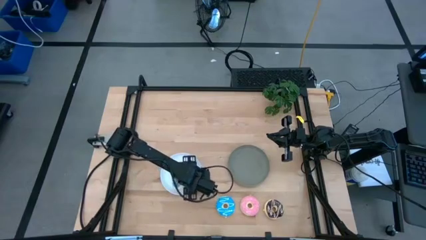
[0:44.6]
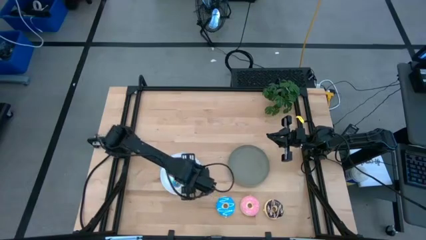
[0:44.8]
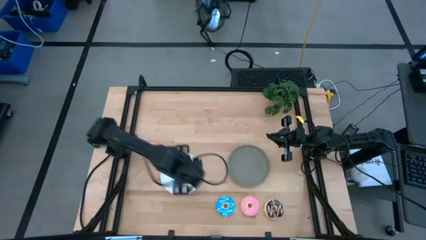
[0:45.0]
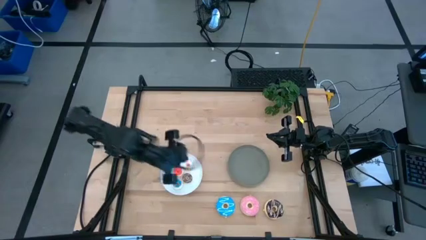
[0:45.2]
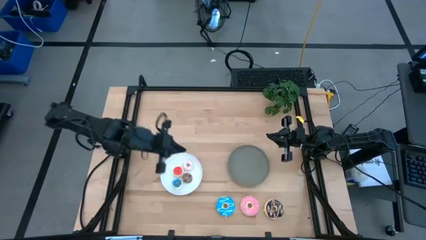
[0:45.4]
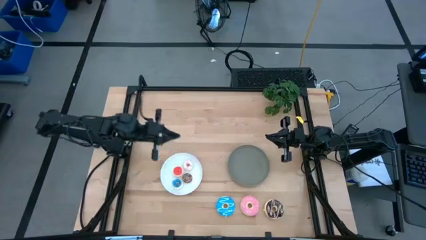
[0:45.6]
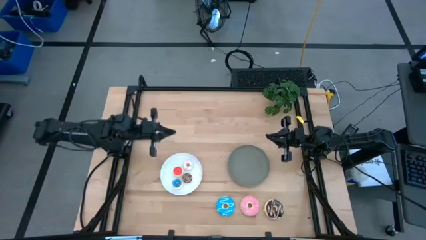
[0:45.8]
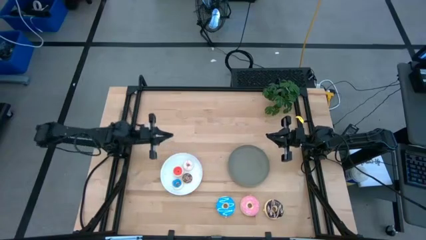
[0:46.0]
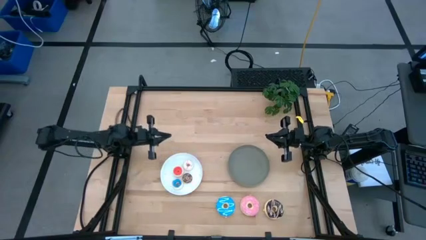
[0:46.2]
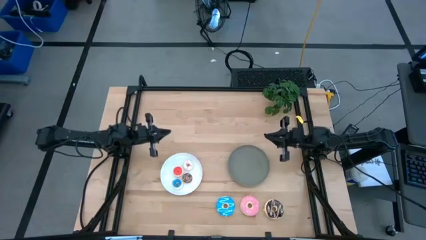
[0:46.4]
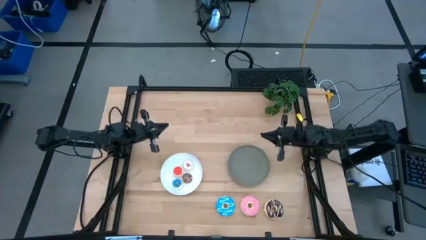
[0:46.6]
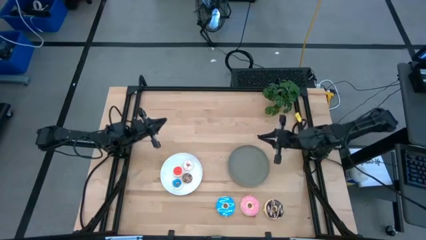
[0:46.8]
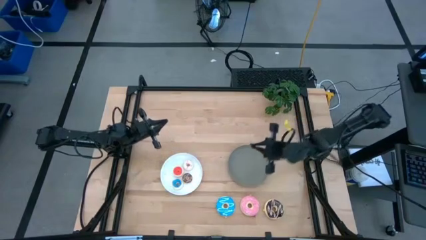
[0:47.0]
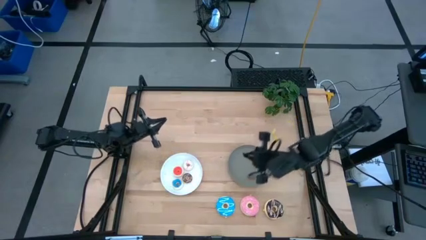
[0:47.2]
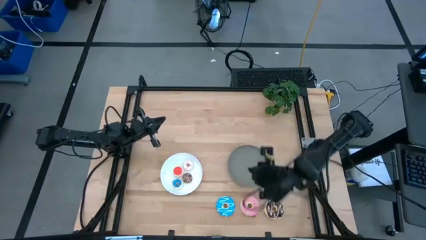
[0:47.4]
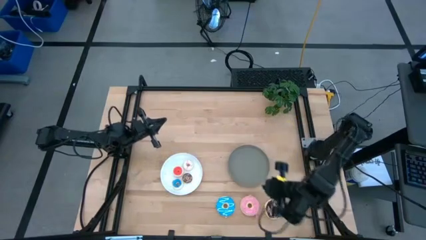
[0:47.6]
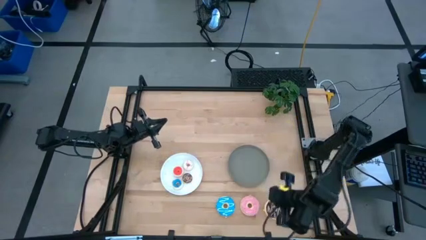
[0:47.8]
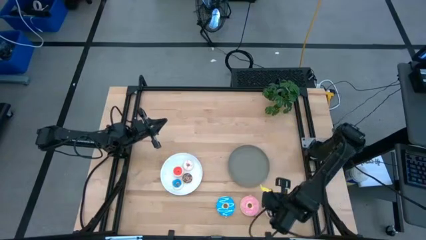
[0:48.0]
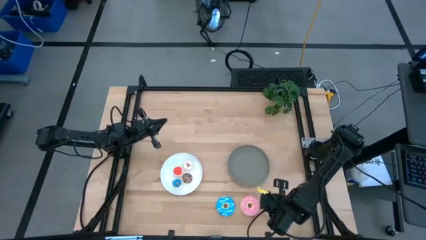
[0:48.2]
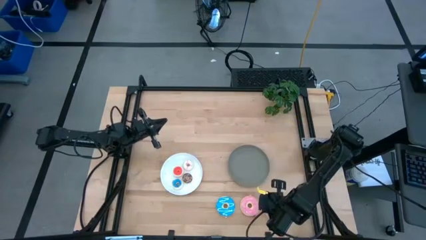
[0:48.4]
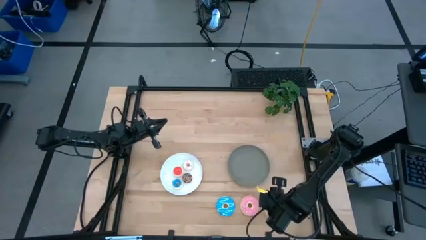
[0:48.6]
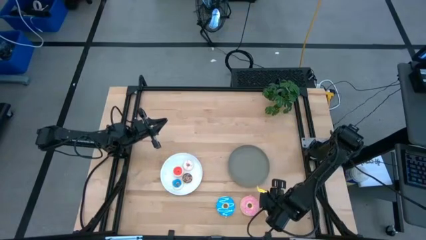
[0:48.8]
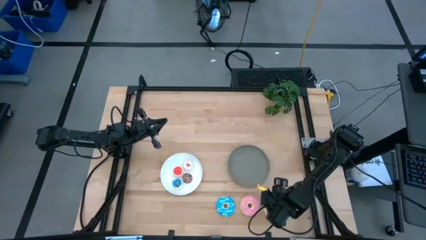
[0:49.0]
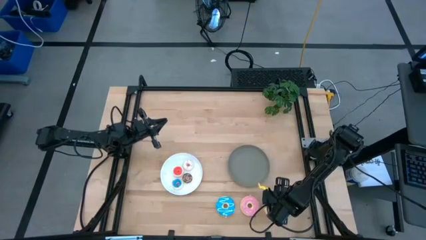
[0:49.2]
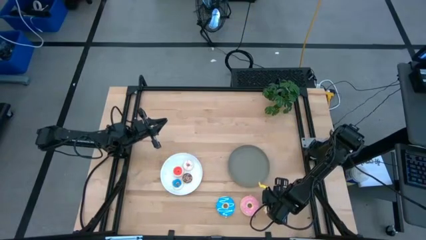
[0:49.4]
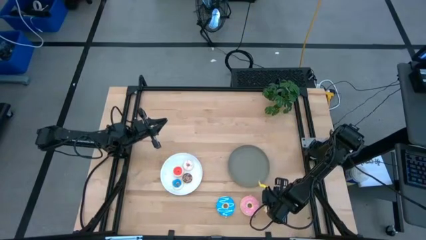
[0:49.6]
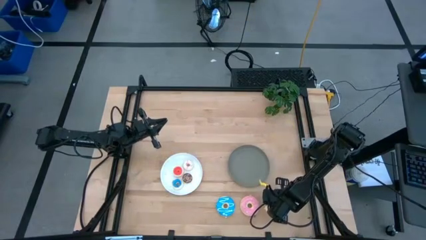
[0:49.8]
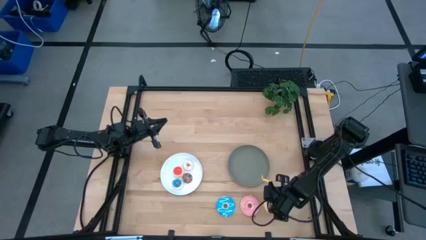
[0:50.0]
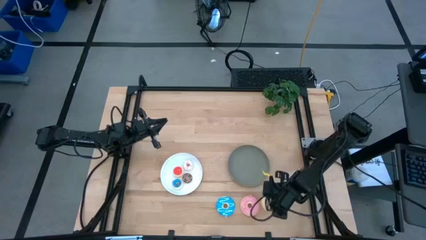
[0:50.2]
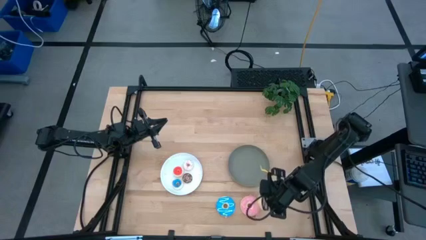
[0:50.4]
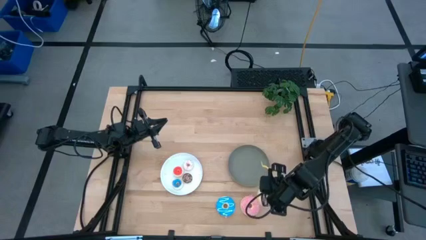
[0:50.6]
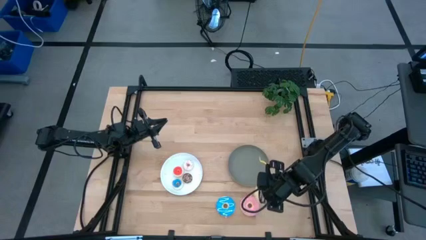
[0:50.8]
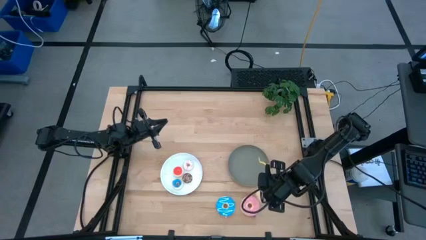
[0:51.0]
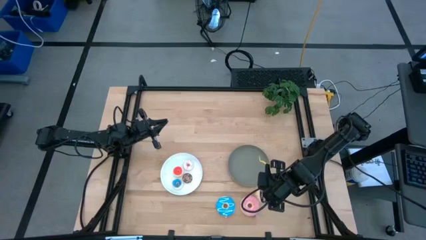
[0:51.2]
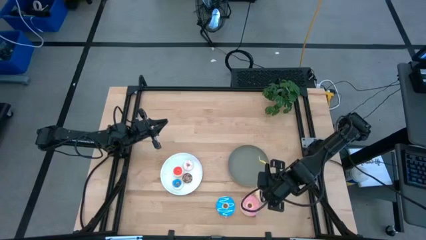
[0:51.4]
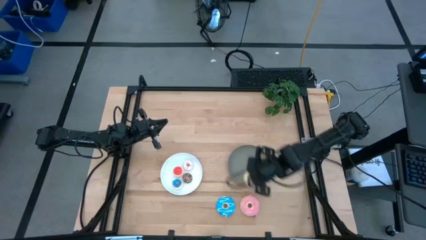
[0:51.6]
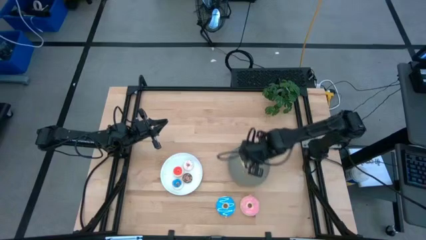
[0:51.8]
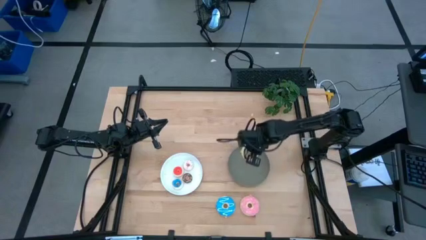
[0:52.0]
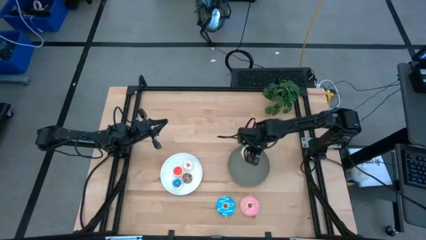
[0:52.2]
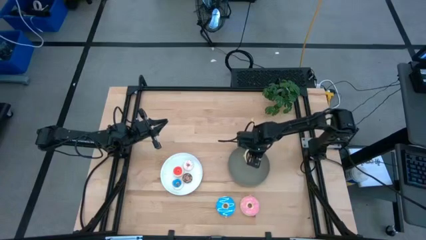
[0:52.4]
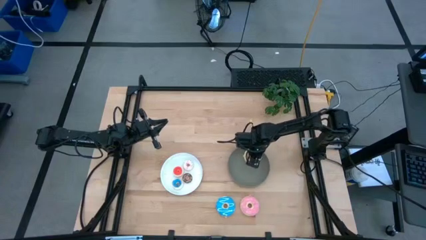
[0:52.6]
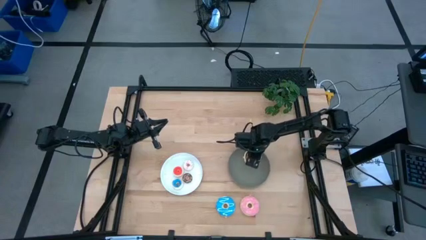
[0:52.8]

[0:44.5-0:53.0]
Task: Pick & Place donuts
Put the large black donut on the gray plate

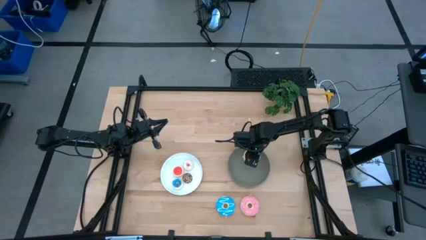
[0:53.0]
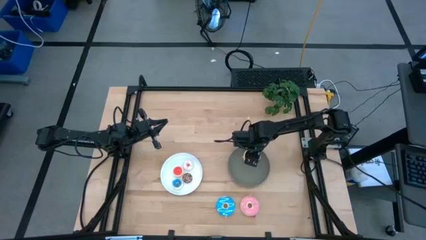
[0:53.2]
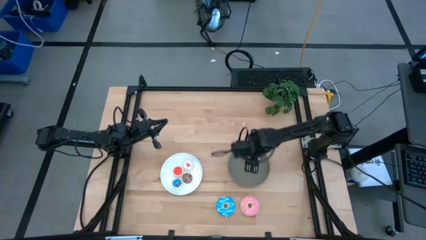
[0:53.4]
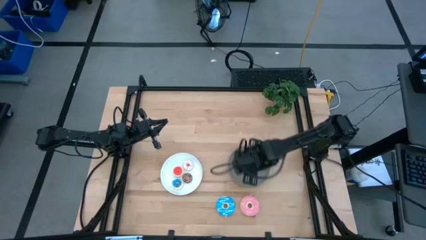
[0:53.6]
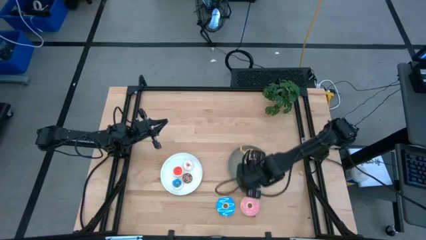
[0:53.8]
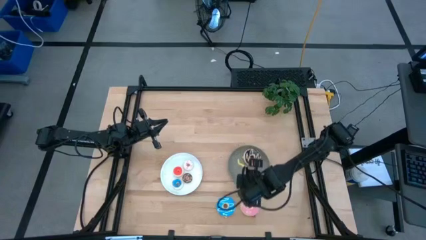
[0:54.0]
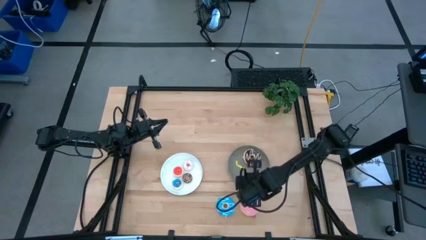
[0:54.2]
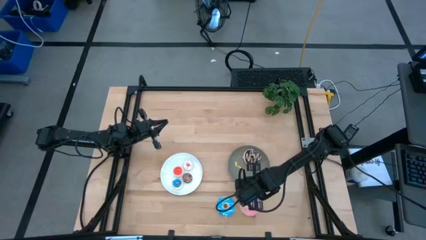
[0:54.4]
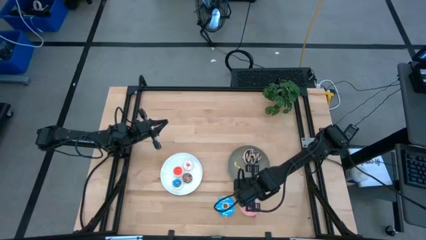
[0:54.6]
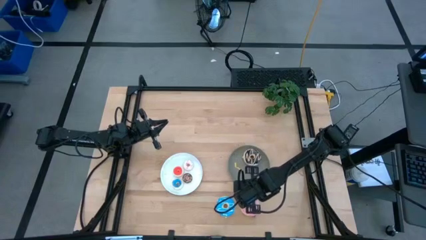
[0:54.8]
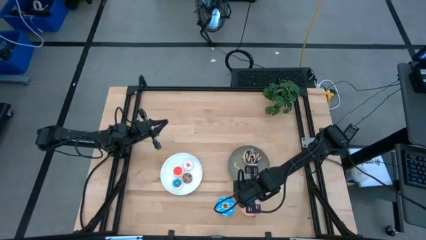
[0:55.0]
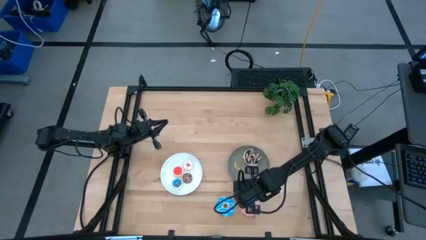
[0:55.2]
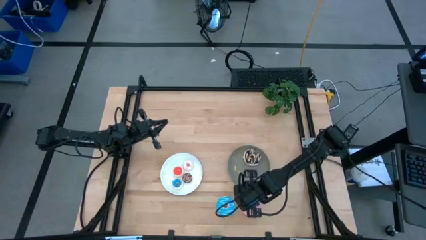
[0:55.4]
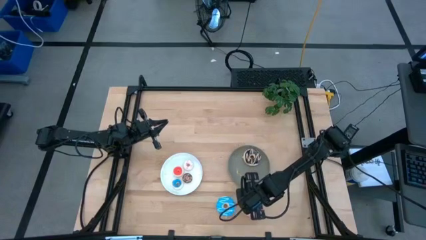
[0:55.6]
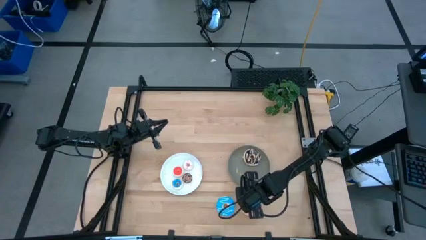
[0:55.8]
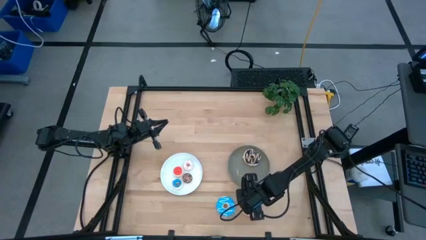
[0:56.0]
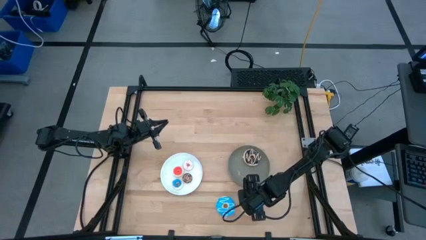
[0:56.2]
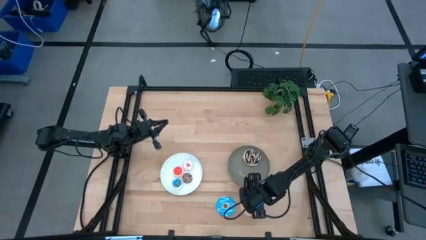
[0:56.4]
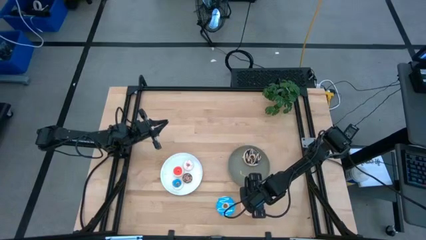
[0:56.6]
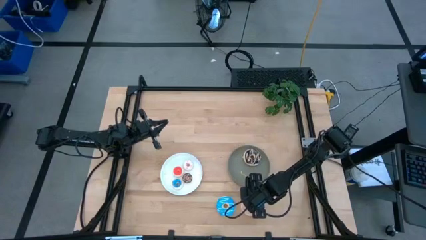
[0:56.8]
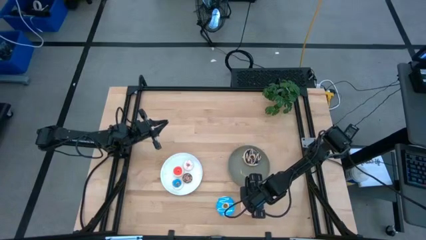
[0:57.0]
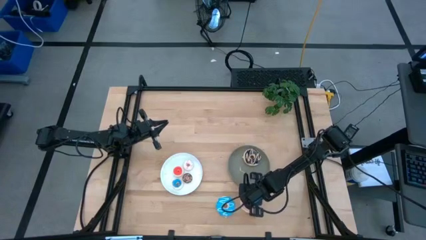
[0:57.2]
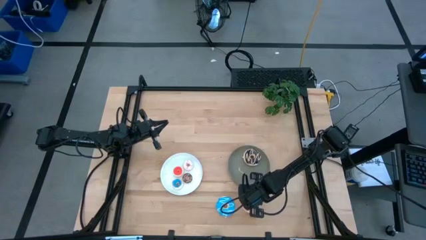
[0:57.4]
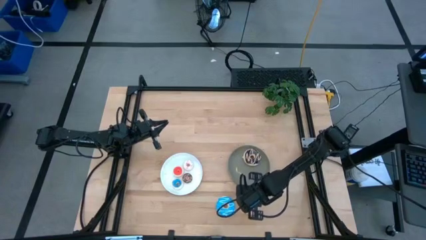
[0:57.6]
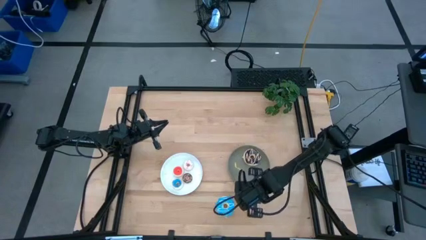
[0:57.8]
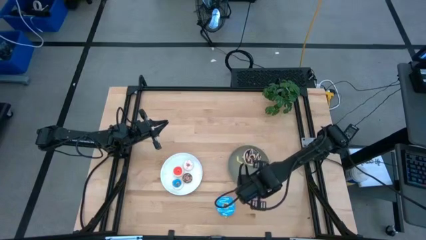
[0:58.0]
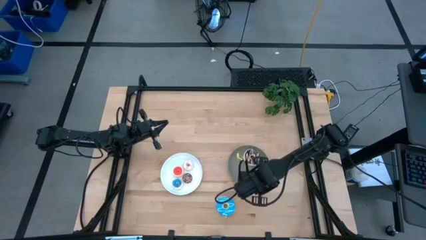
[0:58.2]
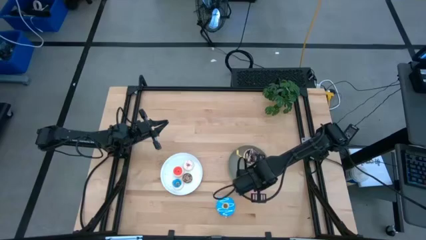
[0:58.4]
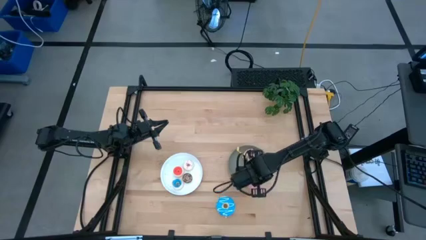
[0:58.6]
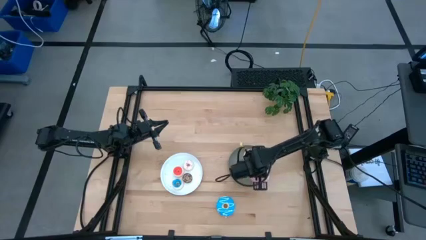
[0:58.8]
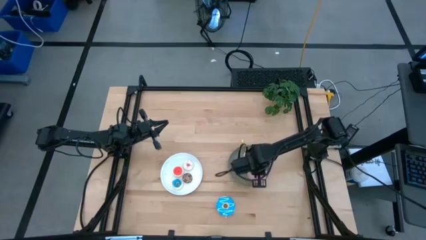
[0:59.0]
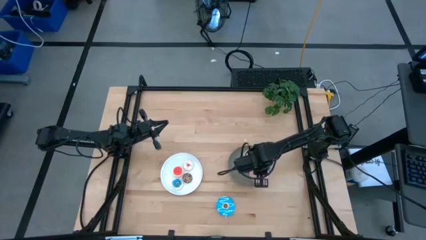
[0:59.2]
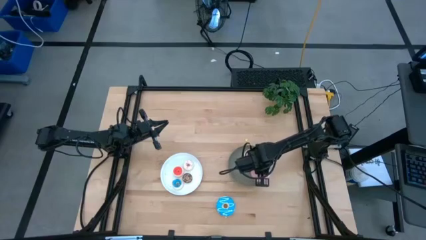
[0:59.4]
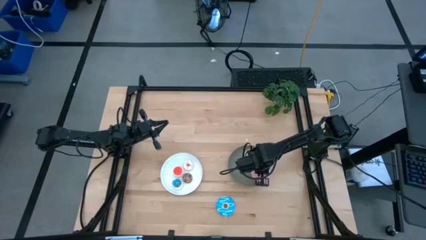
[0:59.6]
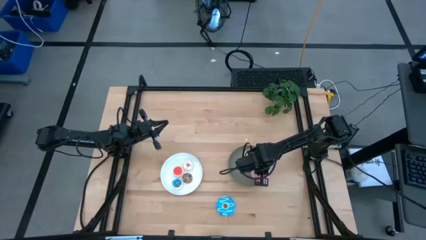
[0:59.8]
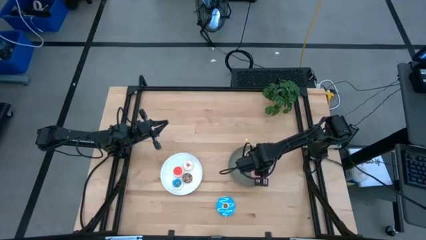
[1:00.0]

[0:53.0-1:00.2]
Put the large pink donut on the gray plate
